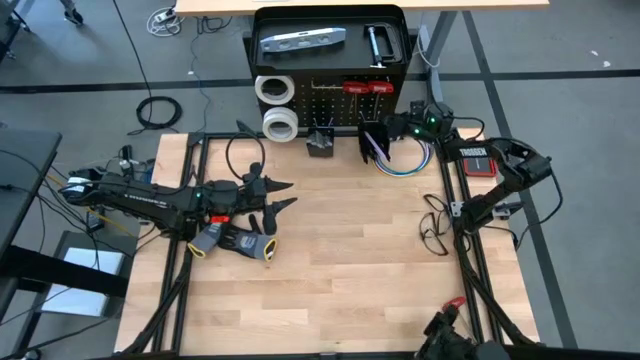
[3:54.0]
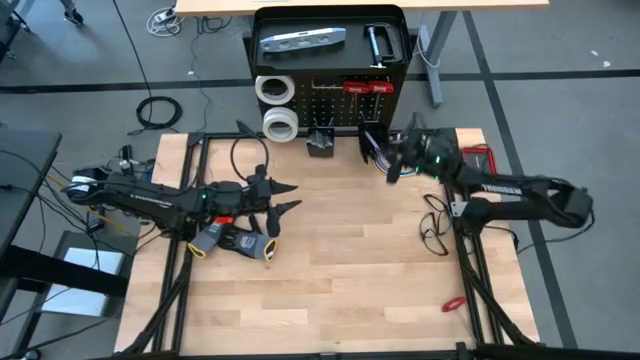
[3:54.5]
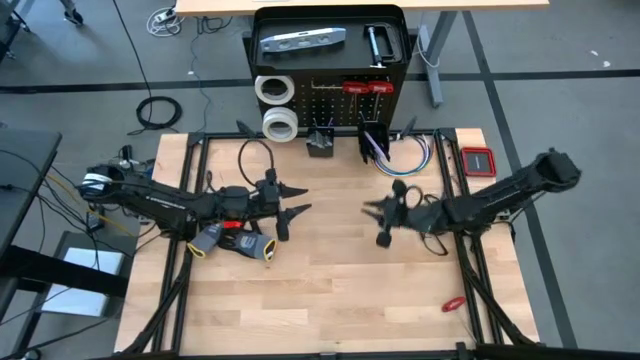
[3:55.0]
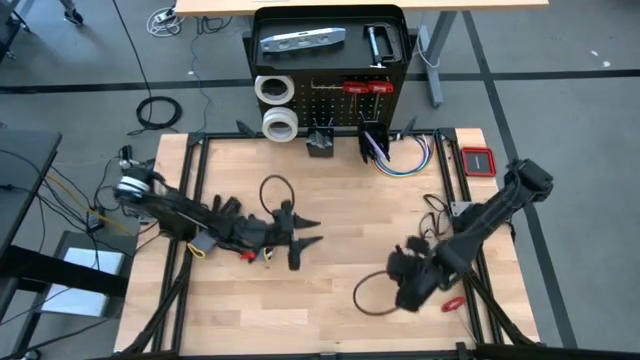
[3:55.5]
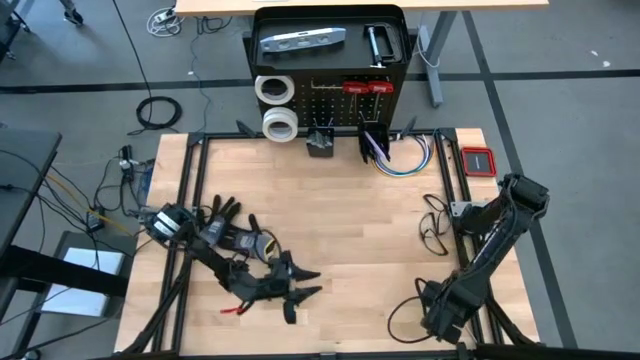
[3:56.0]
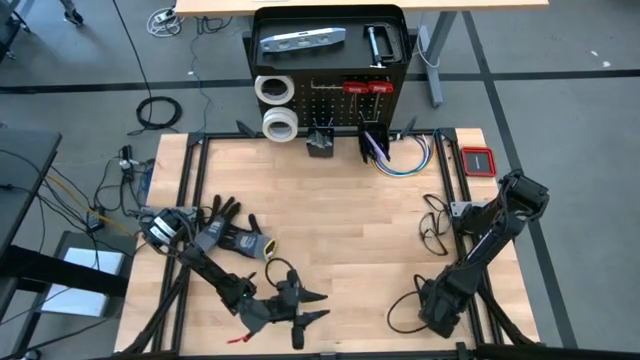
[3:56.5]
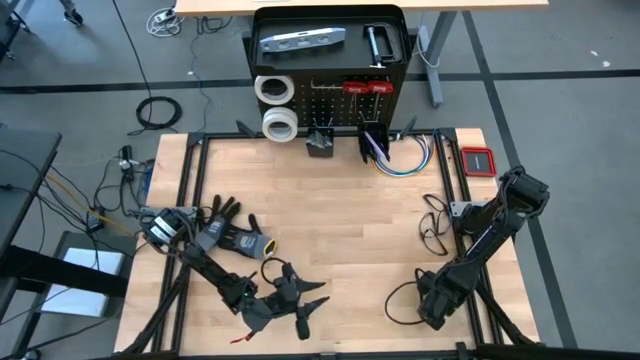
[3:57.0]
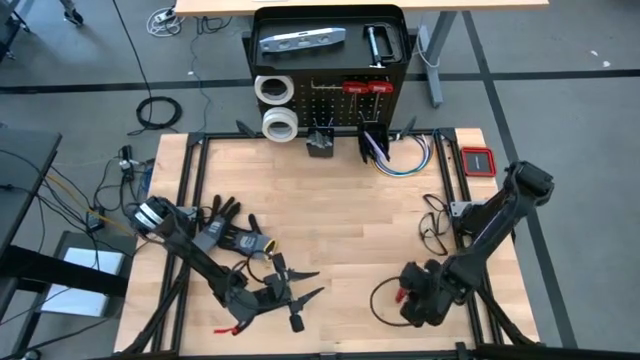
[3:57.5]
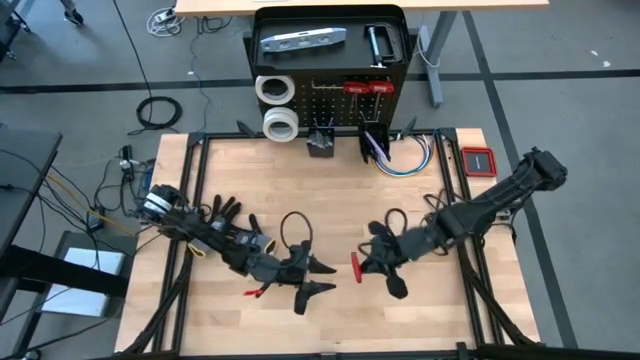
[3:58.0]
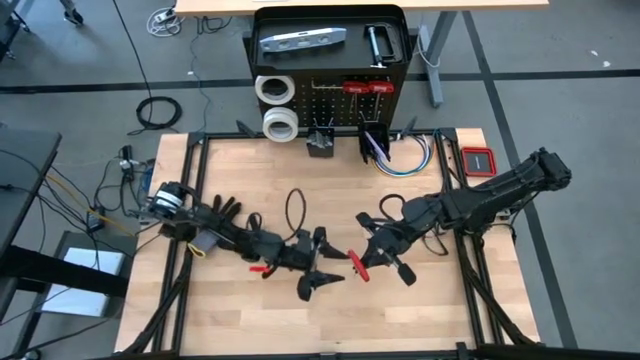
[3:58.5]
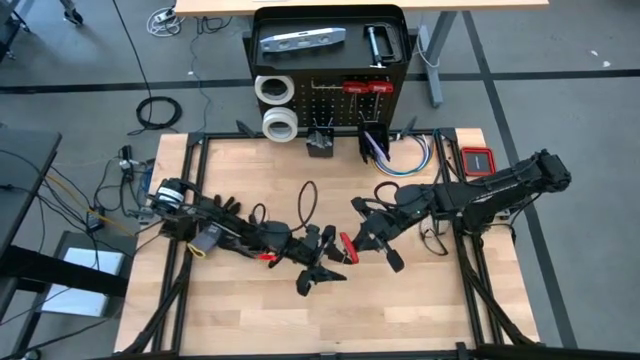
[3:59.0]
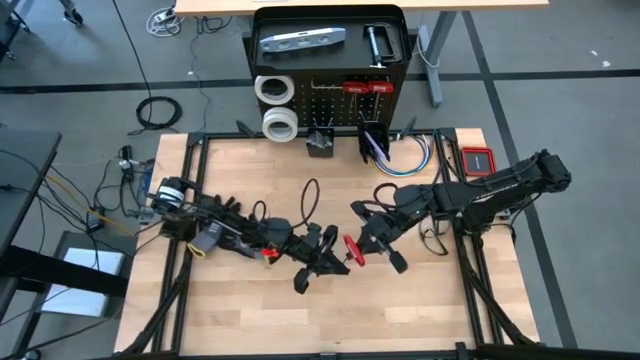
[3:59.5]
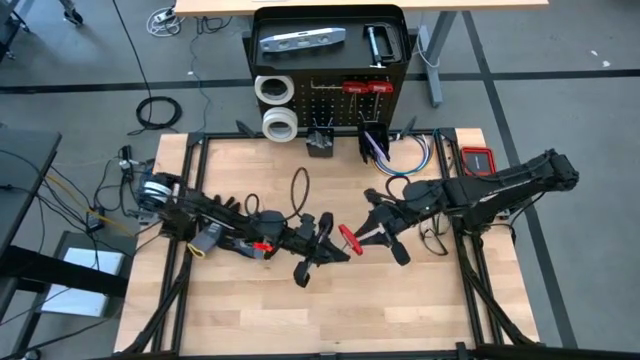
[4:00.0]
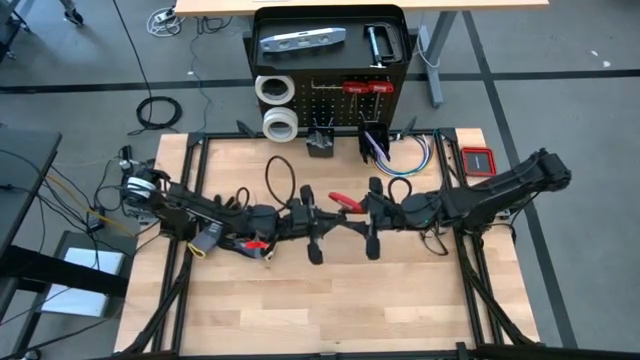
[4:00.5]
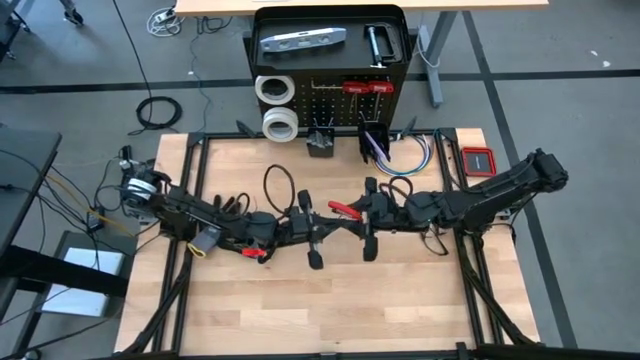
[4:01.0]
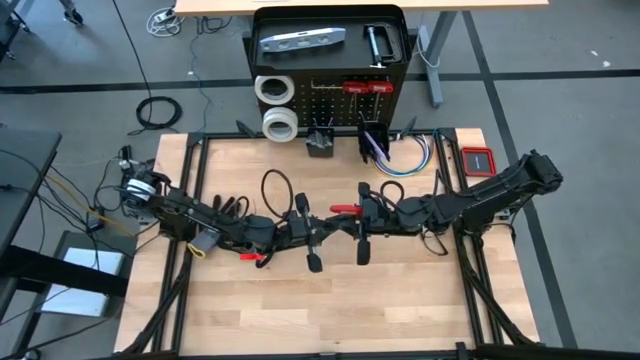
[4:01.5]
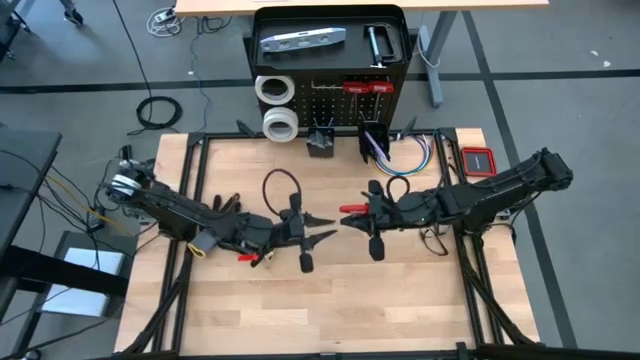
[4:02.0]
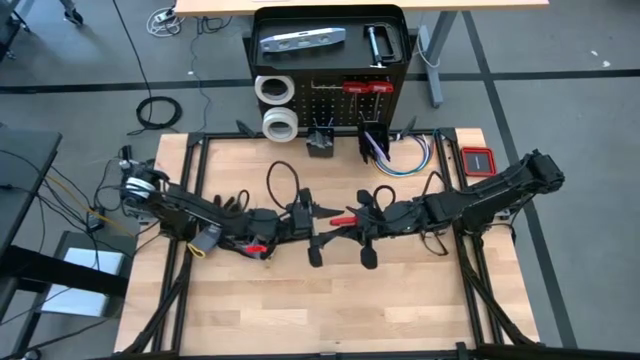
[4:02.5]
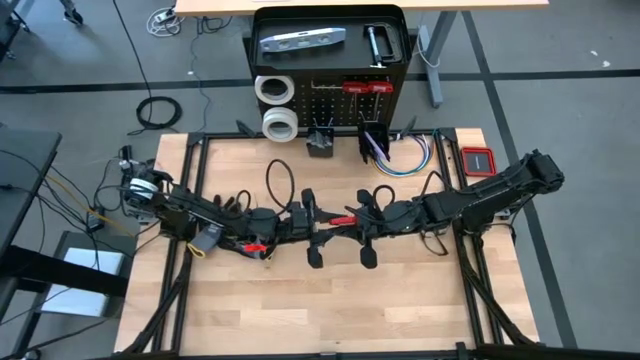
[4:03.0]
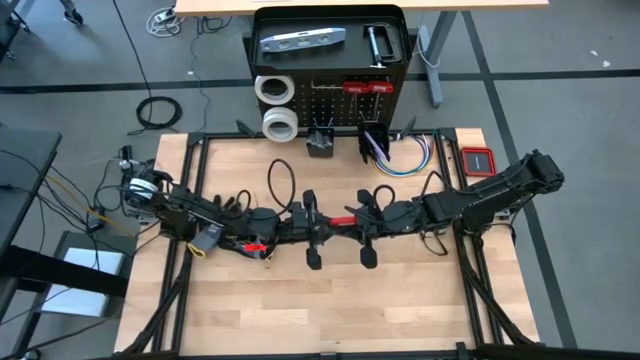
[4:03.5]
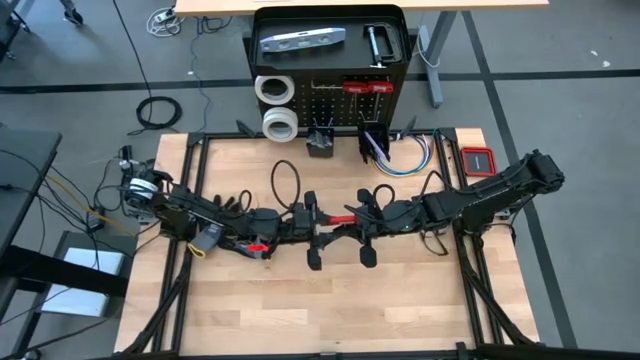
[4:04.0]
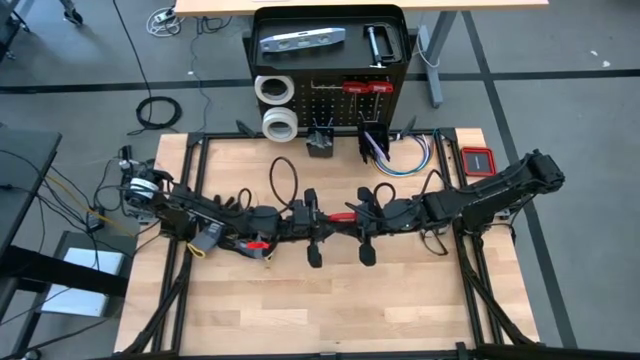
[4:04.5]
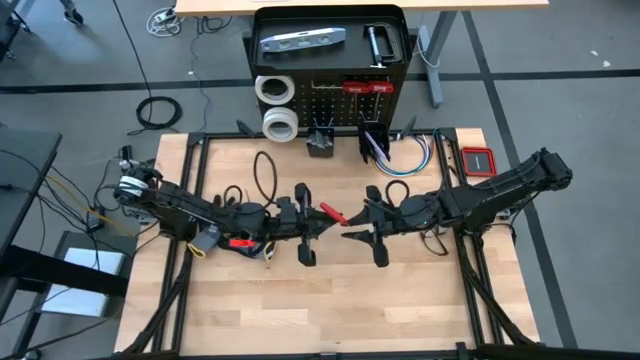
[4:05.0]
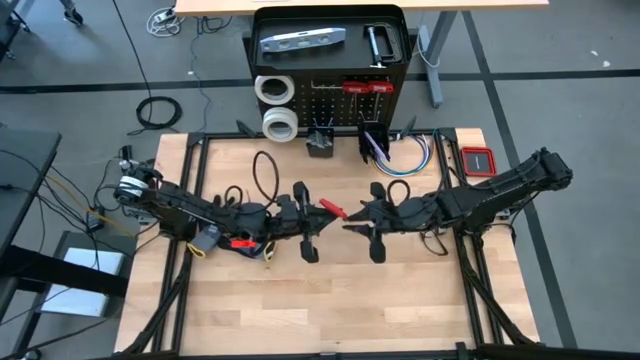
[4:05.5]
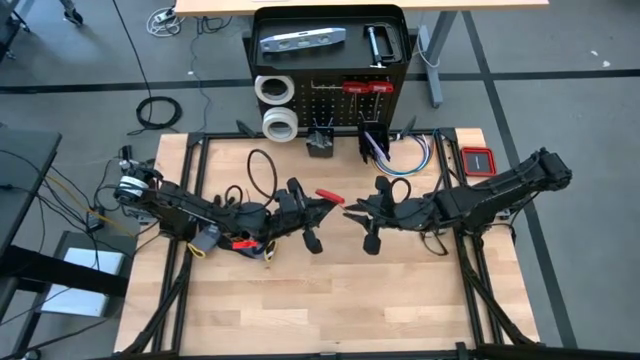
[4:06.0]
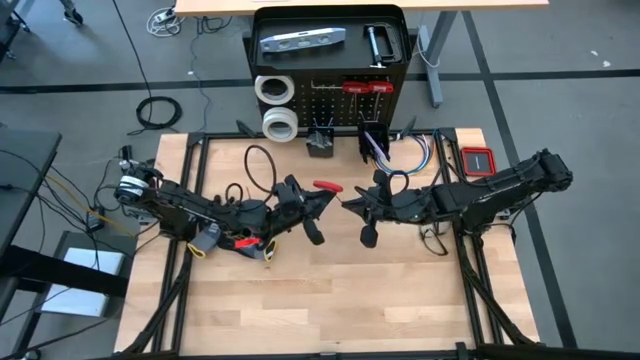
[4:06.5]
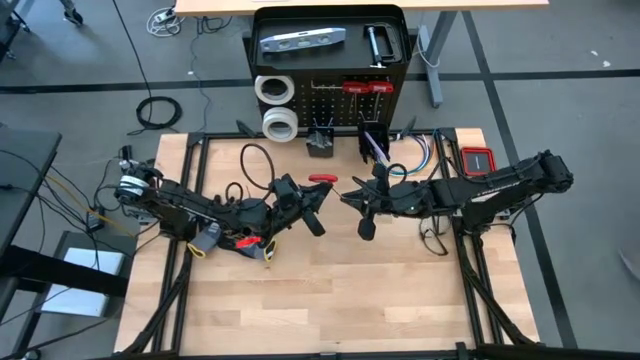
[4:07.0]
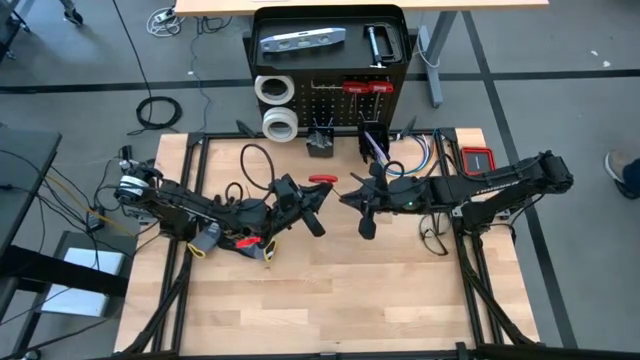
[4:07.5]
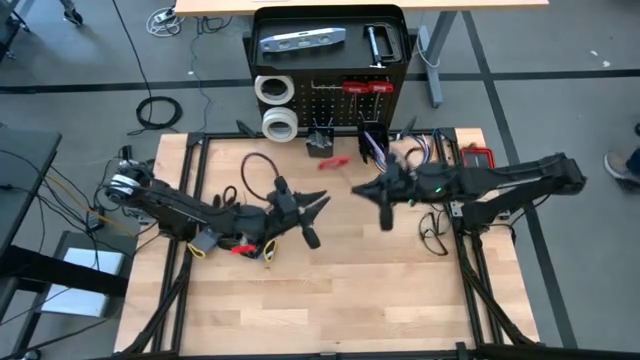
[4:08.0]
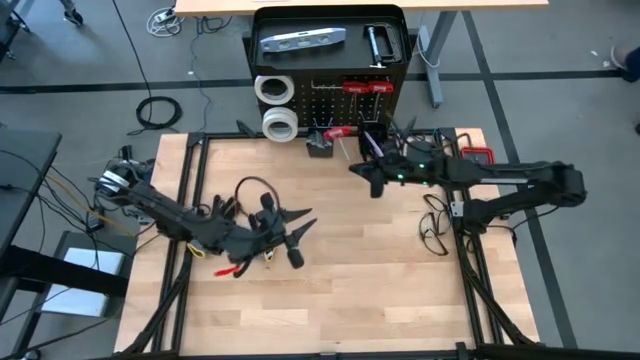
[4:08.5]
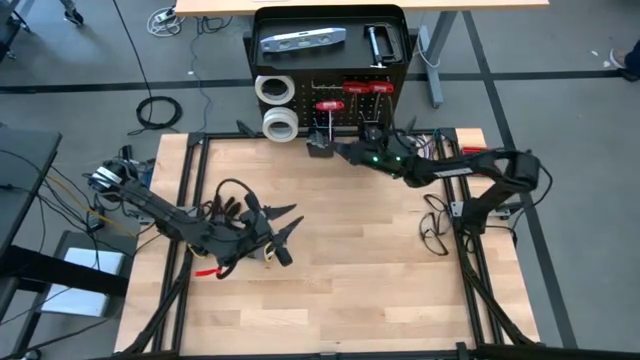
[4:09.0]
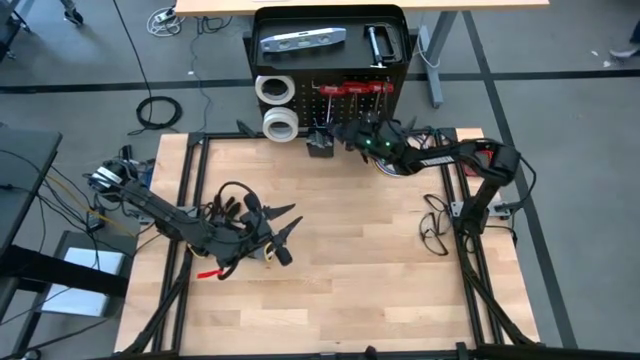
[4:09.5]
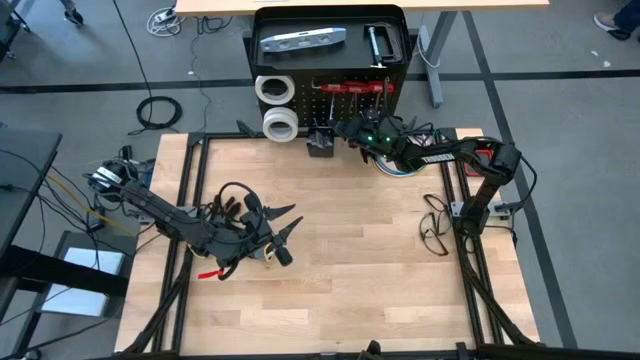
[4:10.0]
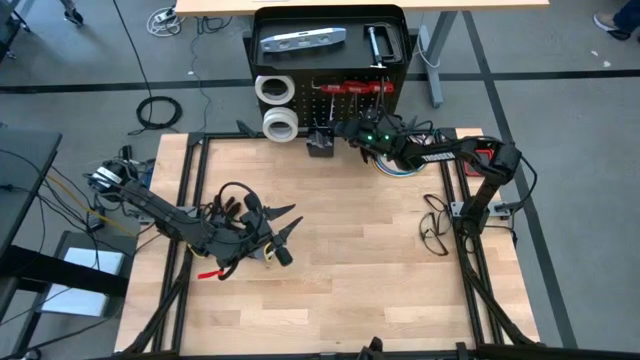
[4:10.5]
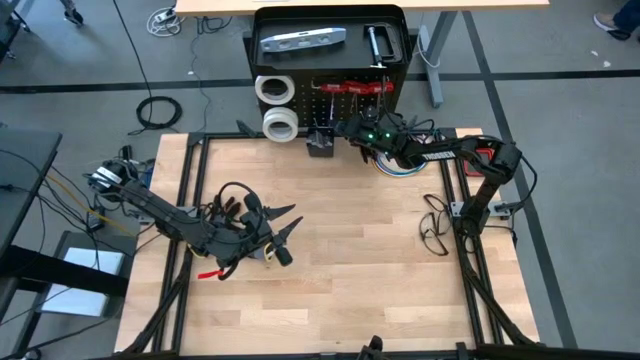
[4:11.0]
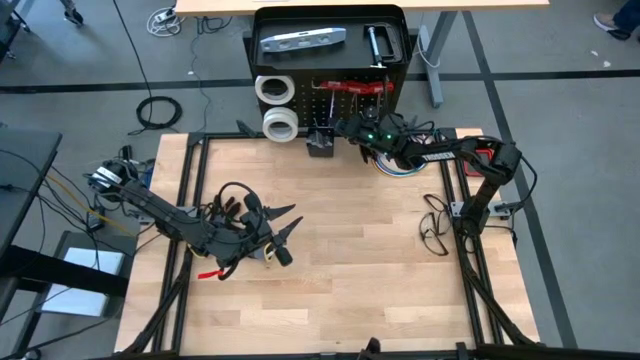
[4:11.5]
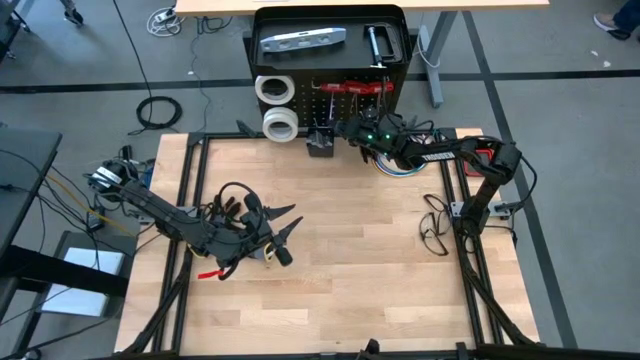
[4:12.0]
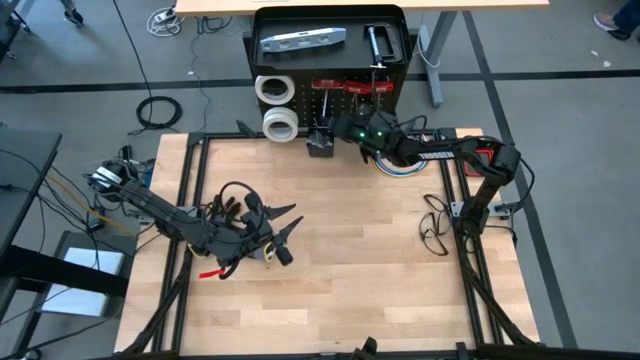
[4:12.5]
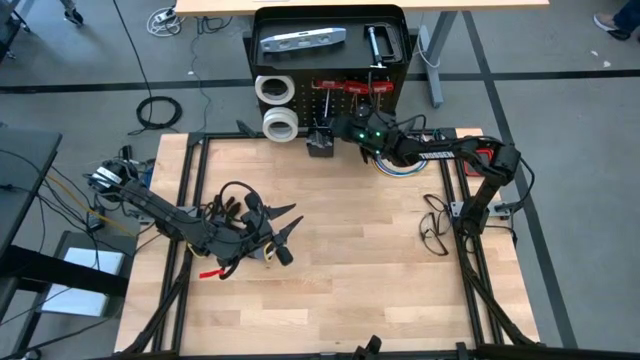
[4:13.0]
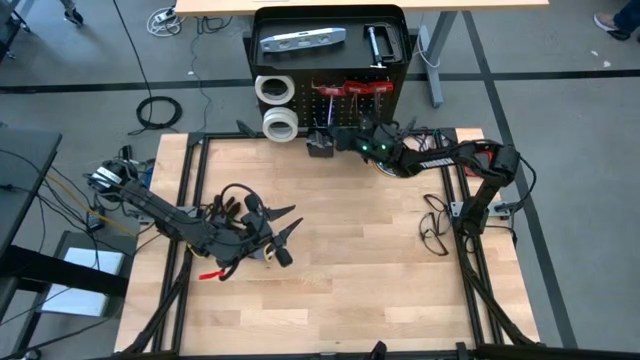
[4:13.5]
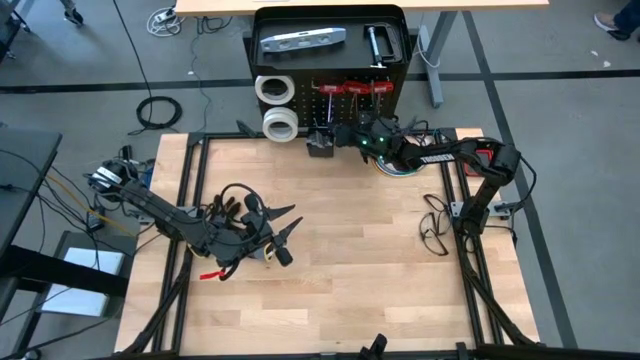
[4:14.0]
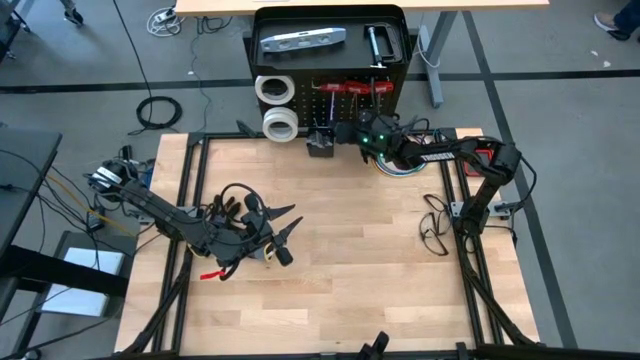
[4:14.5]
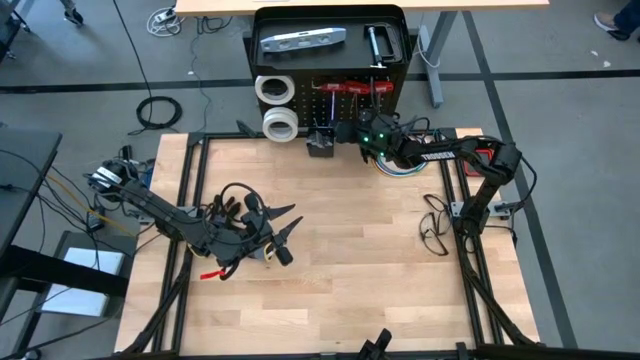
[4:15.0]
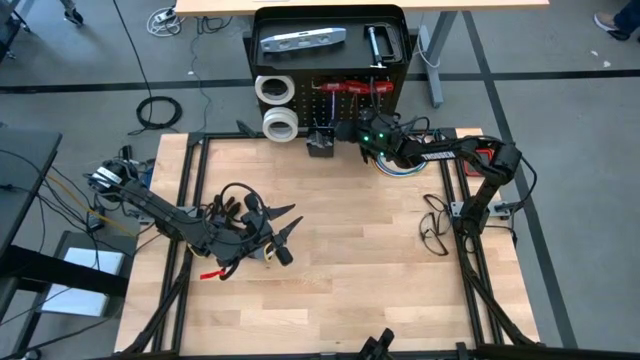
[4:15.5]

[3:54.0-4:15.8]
Task: Hang tools onto peg board
Hang the allen wrench on the peg board
